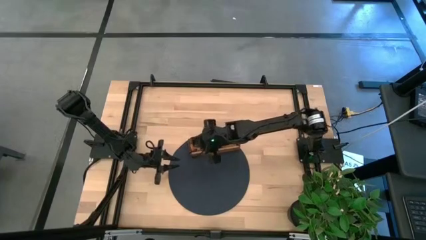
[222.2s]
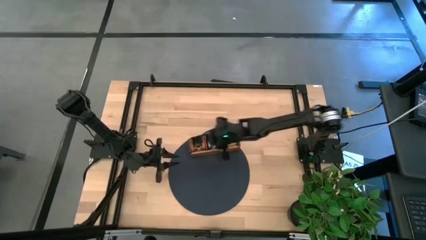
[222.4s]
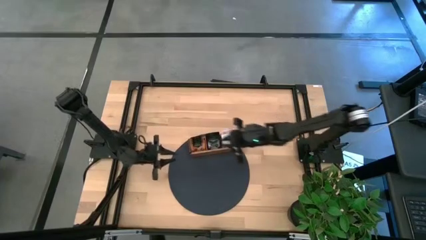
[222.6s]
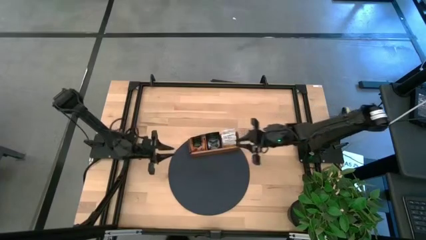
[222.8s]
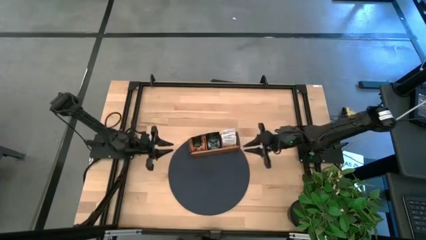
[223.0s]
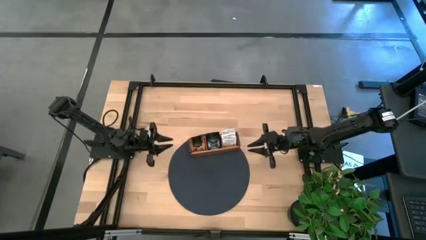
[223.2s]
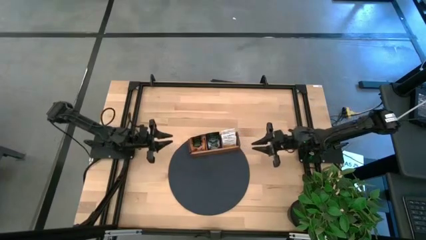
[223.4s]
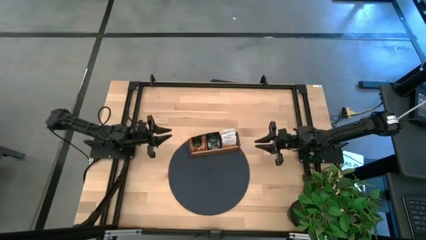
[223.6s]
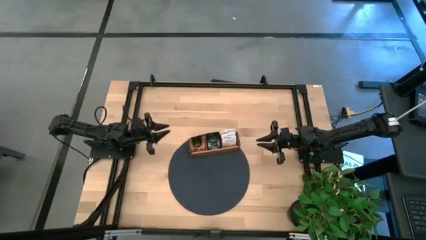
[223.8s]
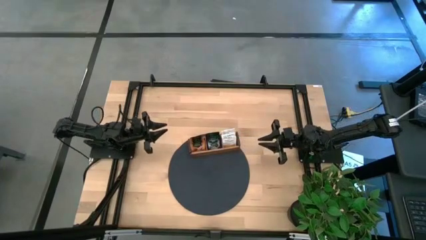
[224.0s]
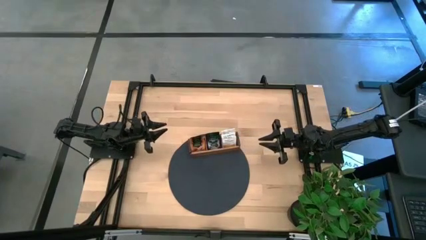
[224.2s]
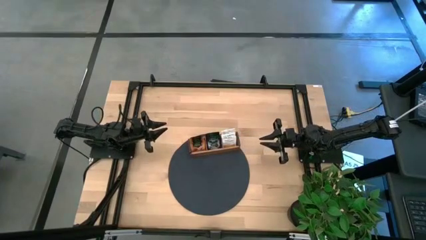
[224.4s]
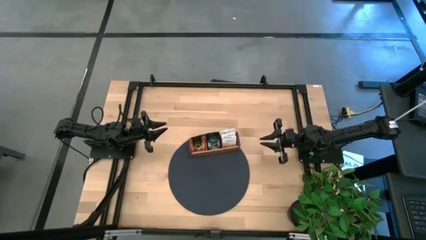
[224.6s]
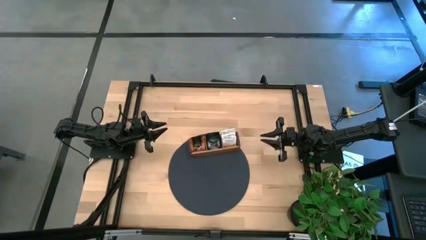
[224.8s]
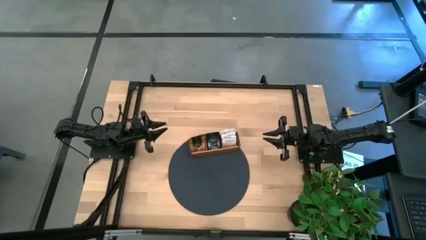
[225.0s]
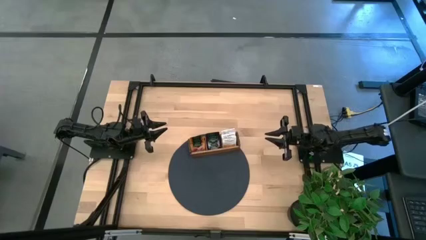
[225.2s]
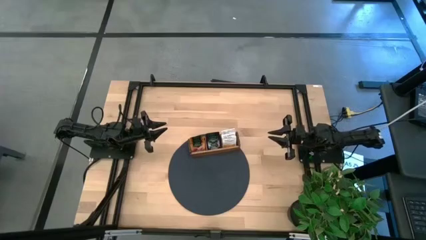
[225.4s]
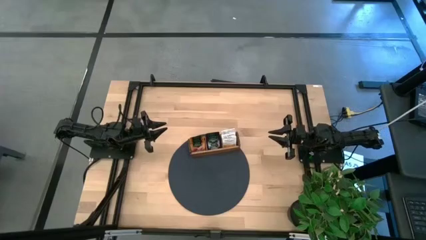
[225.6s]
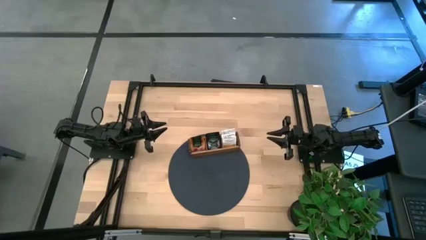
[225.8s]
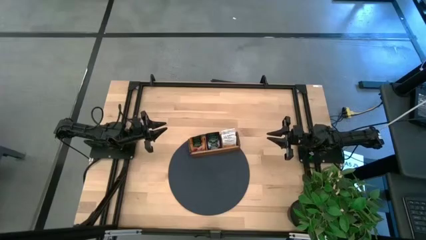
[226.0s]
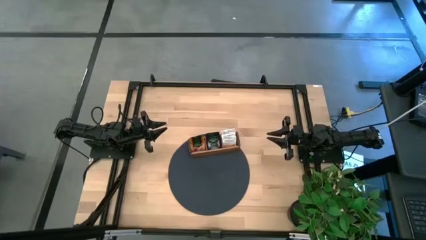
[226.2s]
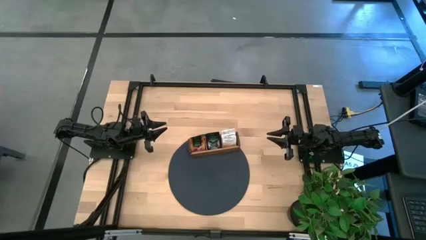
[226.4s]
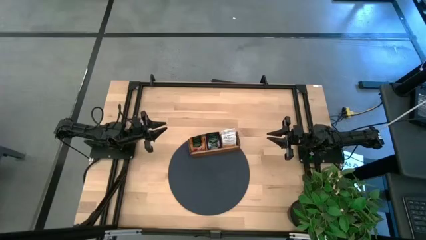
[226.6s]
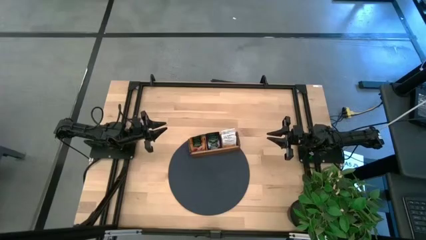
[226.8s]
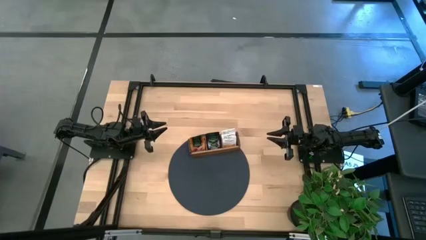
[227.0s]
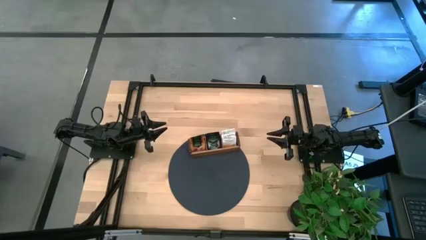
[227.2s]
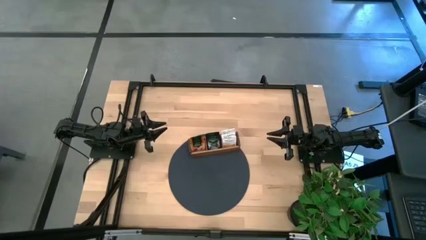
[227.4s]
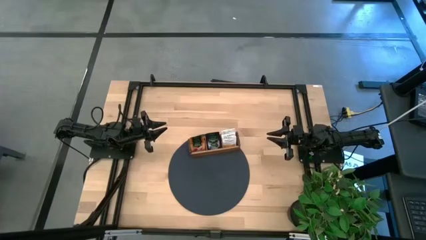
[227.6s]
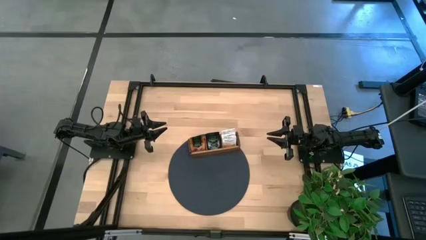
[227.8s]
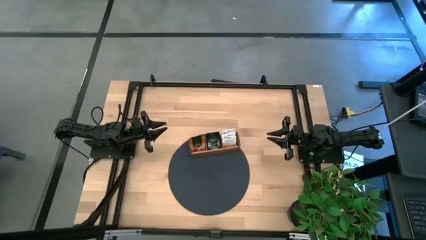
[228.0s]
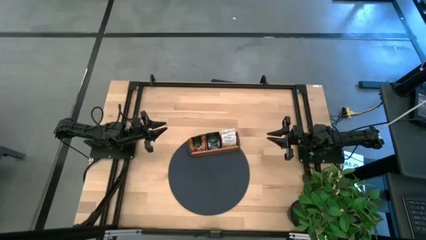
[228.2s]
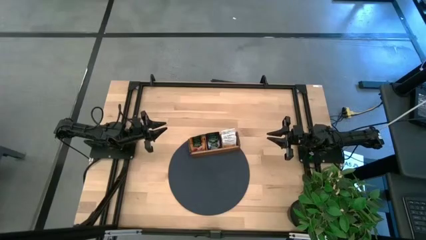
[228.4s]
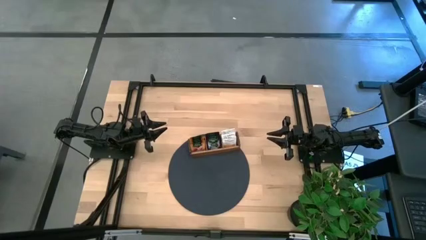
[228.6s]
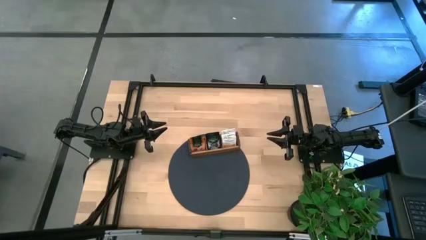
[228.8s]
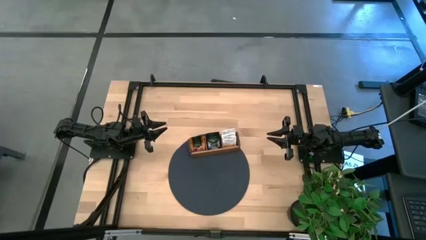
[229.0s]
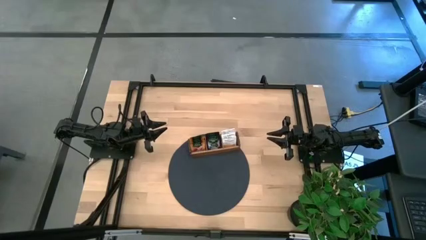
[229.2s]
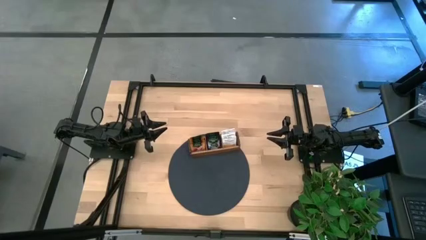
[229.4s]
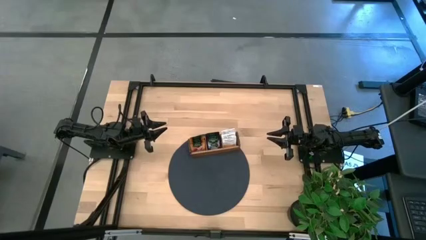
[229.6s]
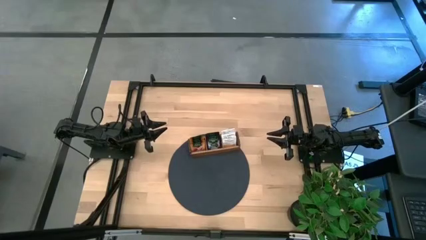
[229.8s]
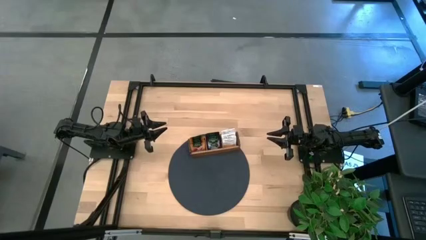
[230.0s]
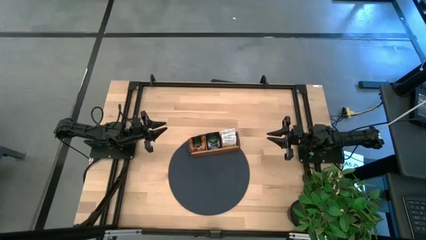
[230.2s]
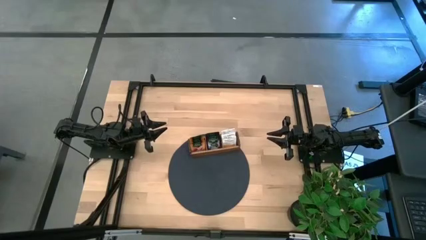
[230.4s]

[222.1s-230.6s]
Task: Pick & Place Tea
Return to Home Position

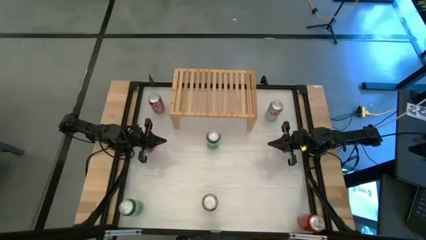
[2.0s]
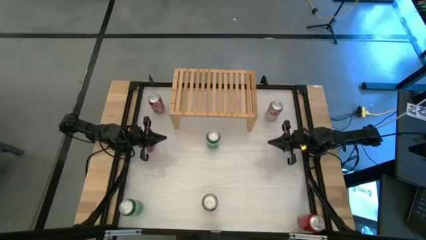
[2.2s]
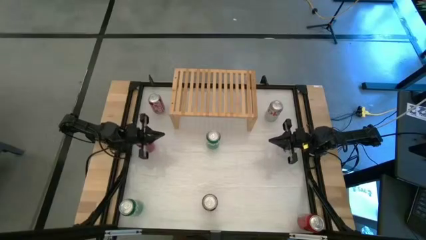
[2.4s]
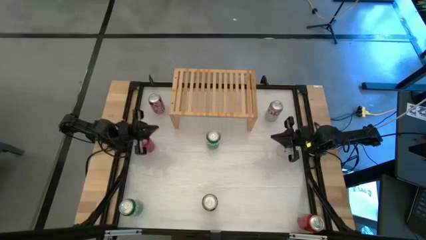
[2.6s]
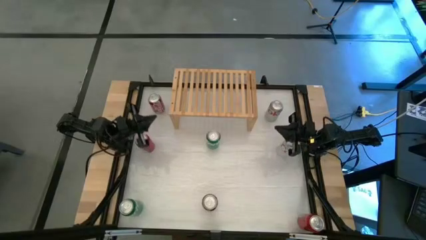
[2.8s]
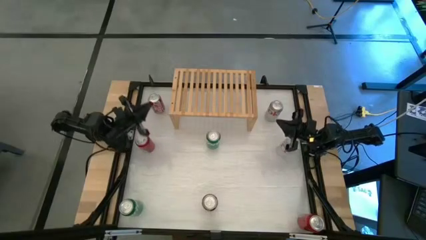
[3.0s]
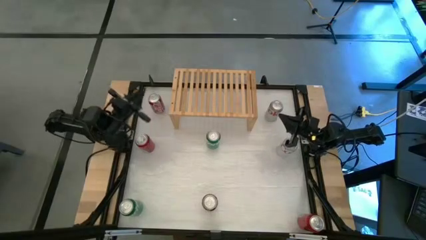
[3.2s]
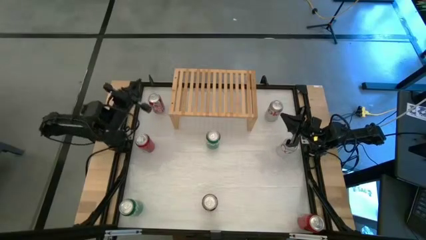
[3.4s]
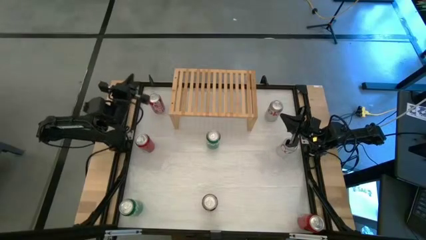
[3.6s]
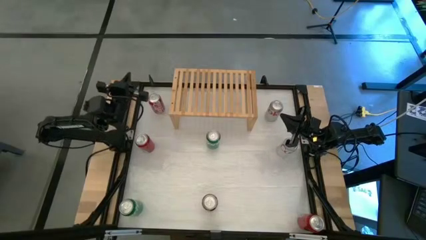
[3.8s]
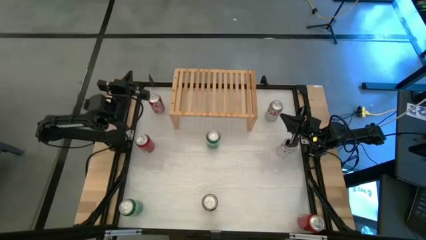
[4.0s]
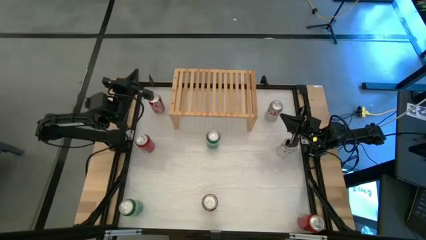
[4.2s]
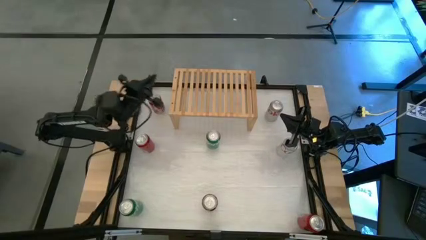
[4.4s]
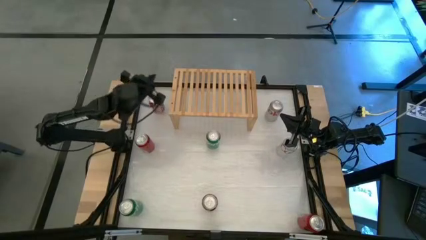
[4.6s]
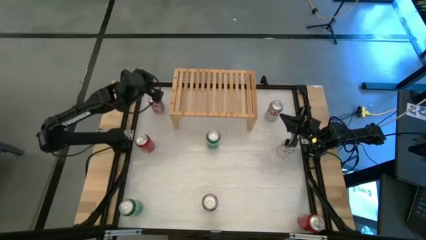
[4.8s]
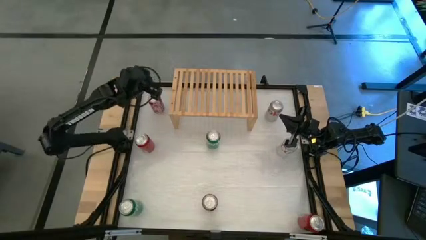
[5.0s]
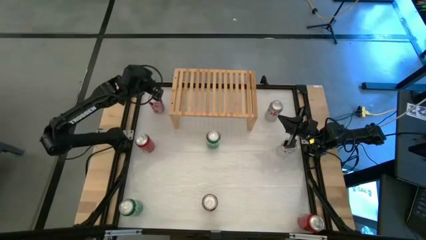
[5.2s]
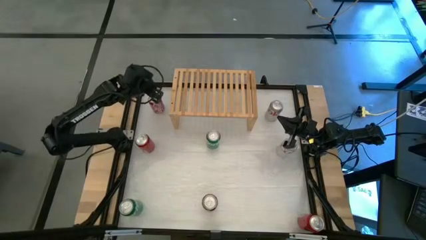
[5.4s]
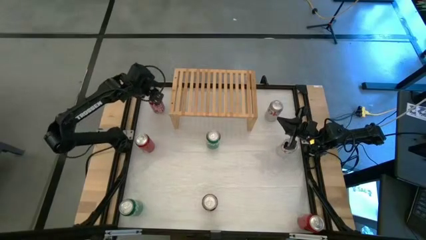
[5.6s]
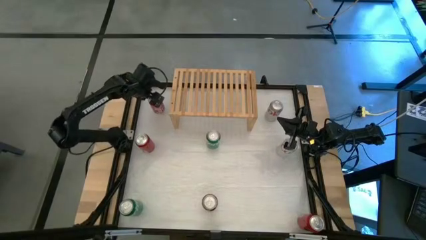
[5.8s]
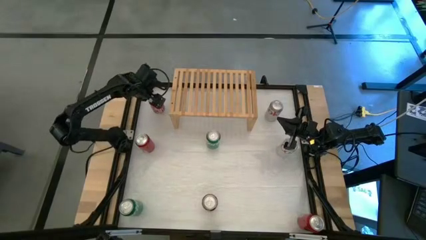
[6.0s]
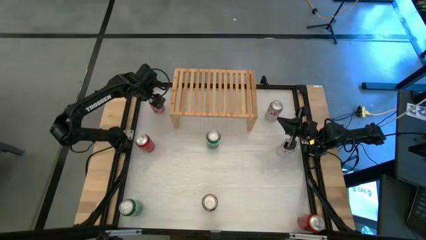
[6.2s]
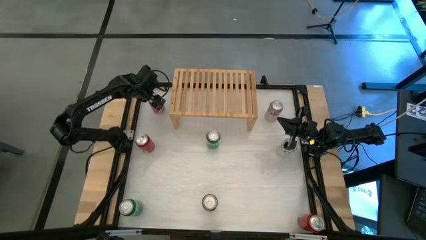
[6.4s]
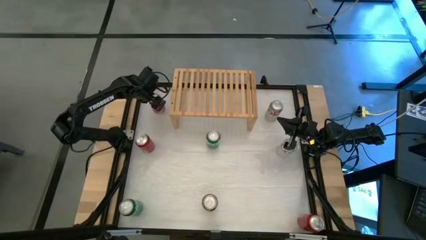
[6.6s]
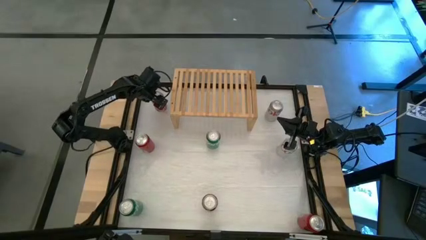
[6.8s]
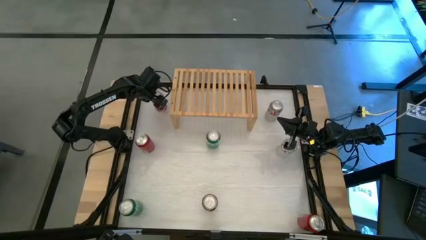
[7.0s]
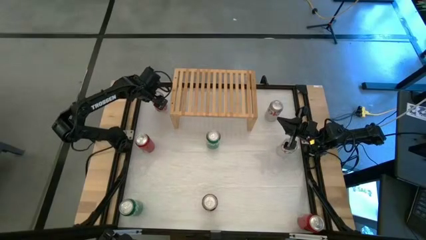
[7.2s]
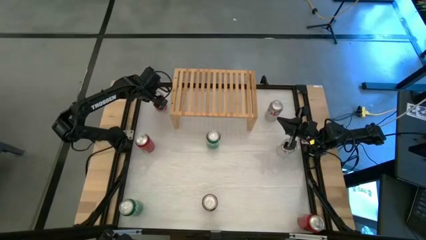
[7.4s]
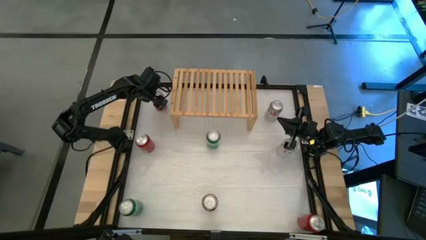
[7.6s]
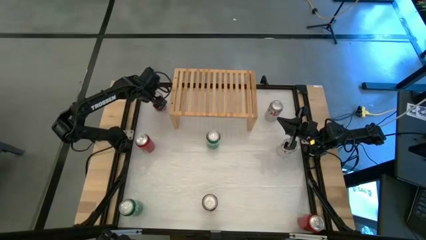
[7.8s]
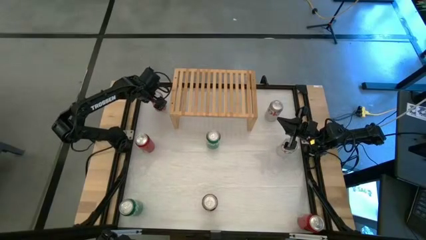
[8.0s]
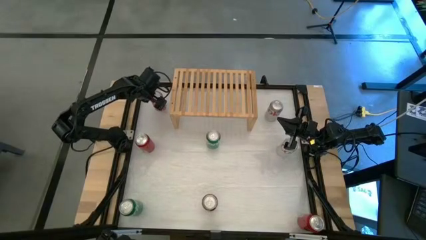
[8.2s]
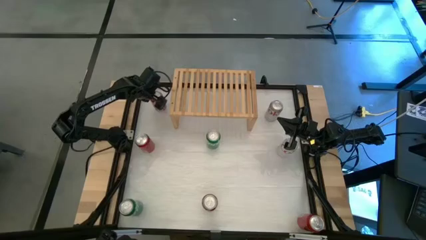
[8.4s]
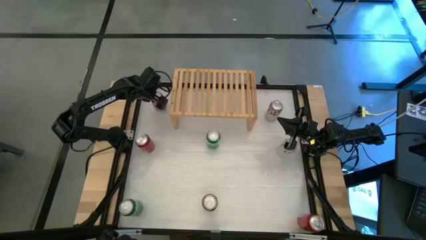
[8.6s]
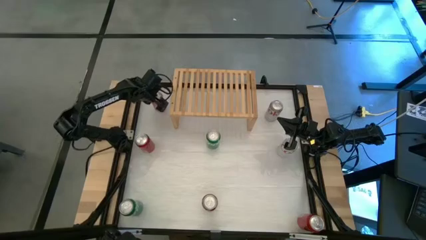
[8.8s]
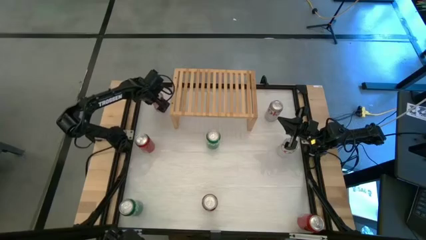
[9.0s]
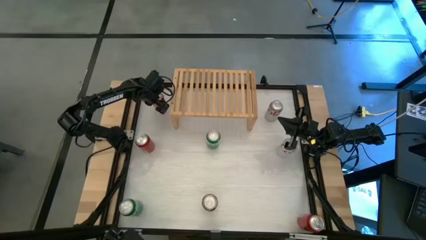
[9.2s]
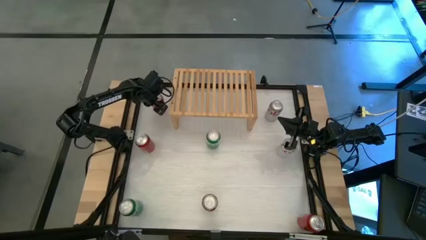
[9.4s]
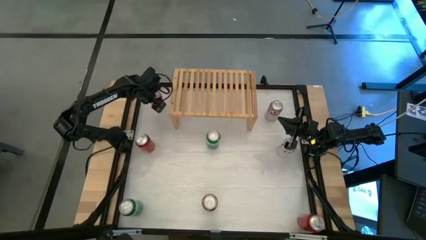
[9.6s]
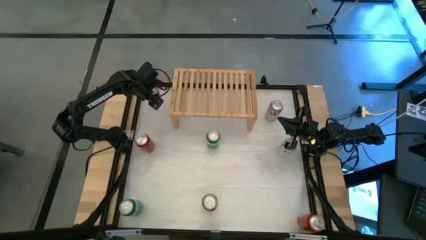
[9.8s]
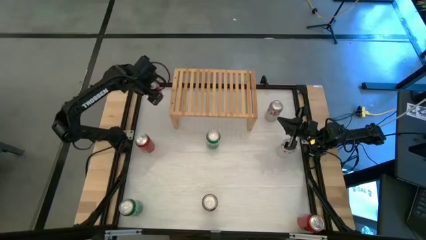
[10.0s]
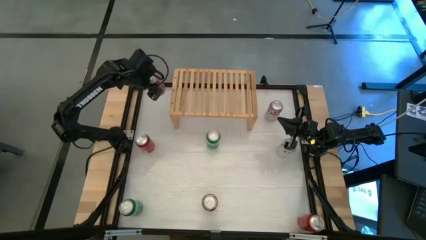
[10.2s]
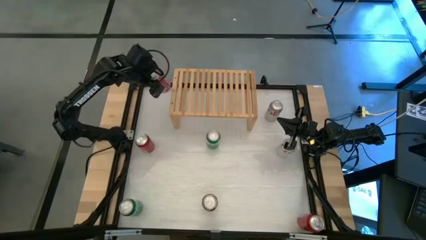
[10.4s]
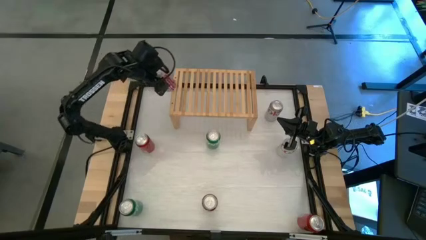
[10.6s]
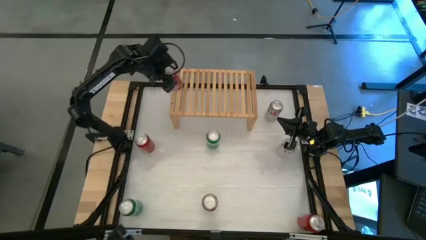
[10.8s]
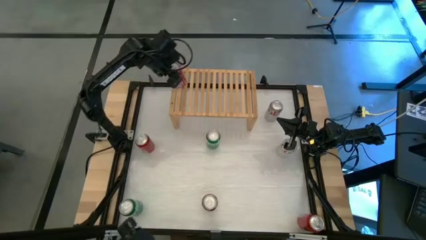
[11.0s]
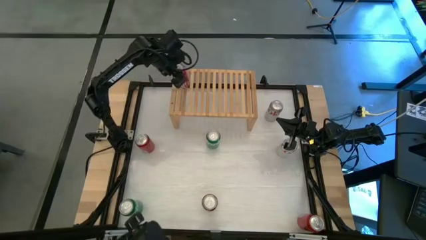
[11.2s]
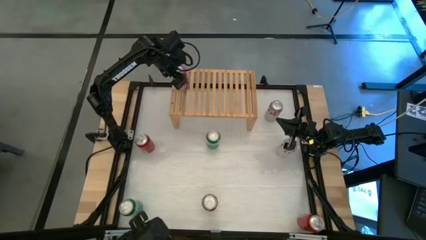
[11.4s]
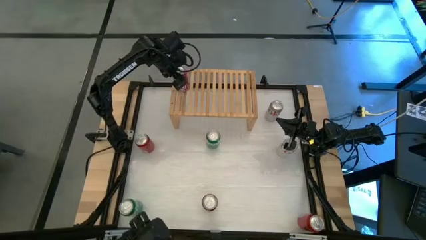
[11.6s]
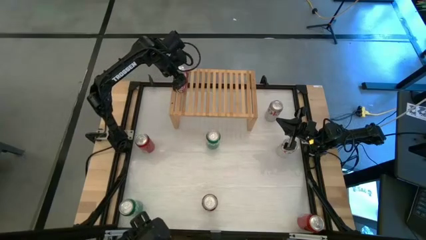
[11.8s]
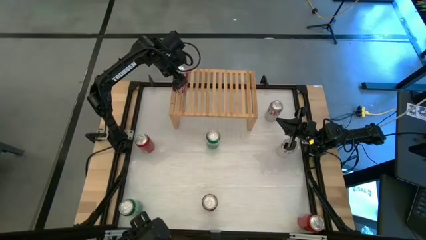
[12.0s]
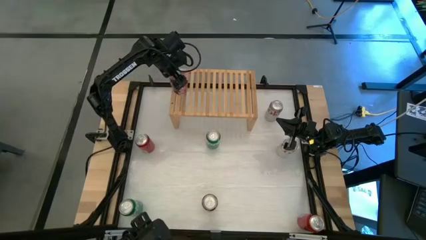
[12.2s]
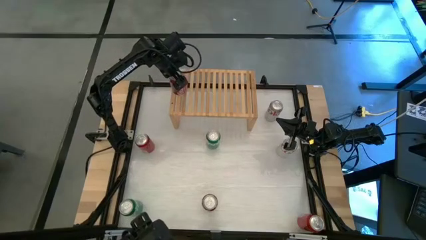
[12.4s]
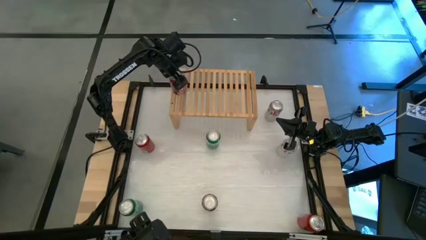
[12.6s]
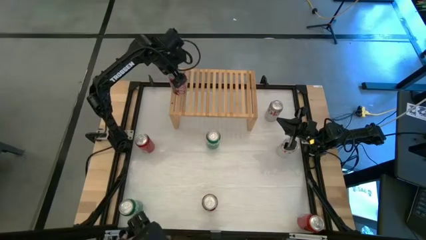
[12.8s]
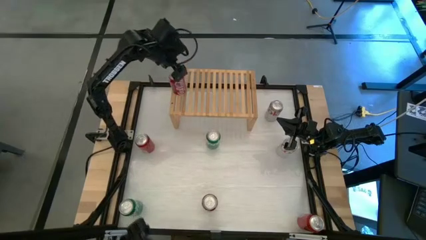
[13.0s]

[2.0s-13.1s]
Task: Place canned beverage on shelf
Put the top red white soda can on the shelf
